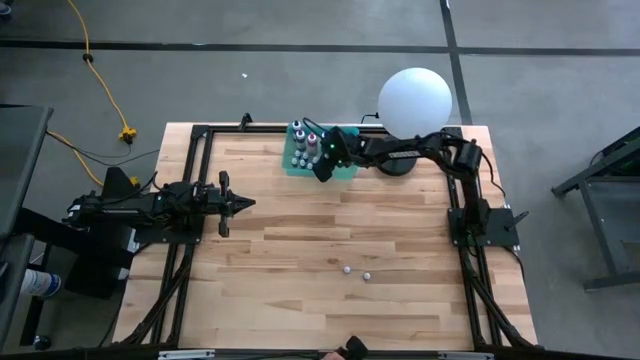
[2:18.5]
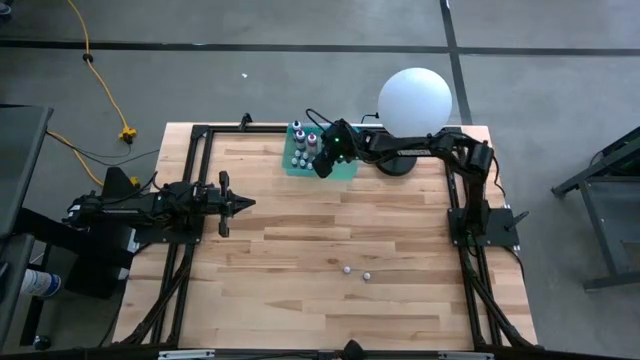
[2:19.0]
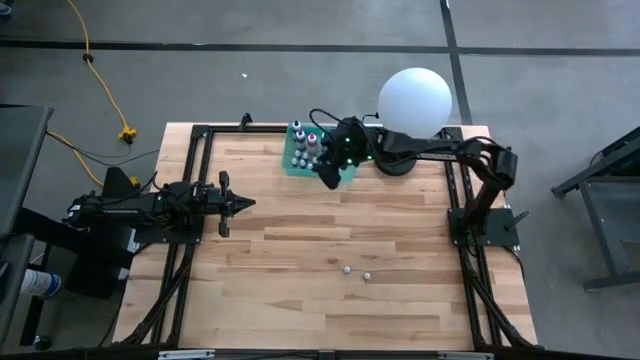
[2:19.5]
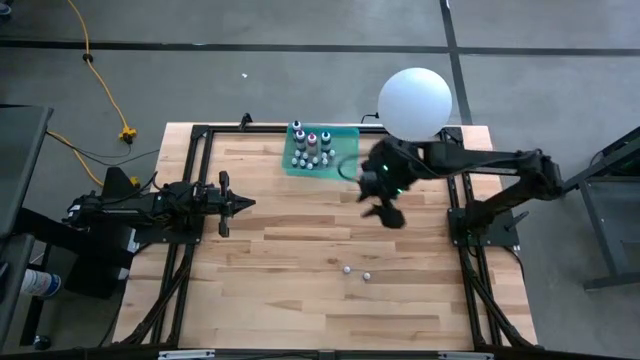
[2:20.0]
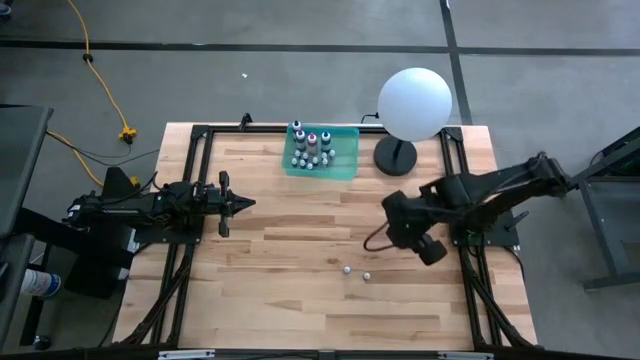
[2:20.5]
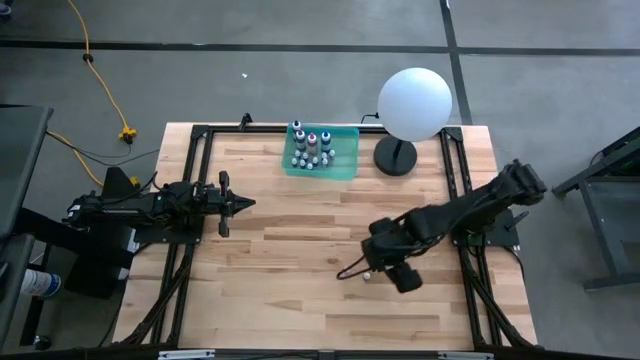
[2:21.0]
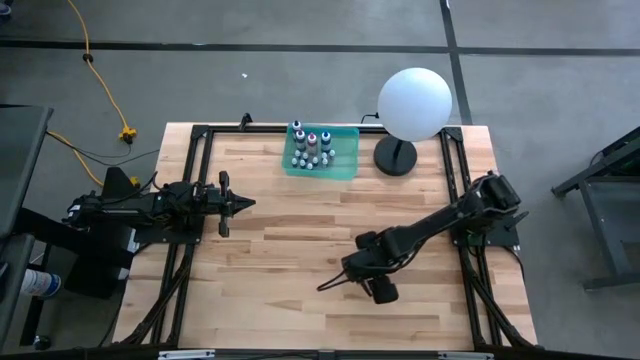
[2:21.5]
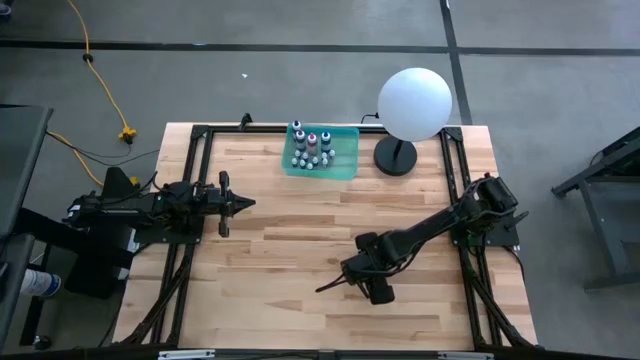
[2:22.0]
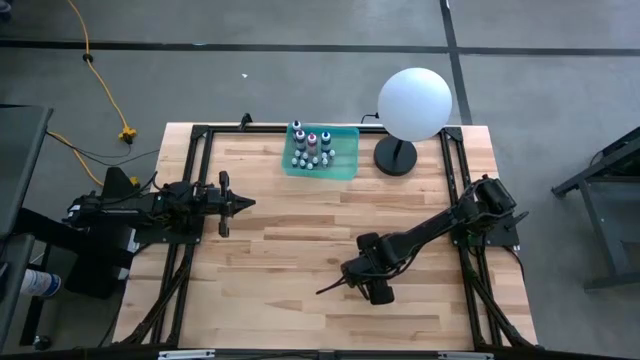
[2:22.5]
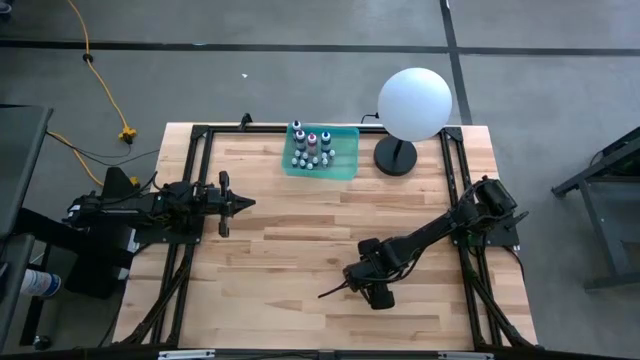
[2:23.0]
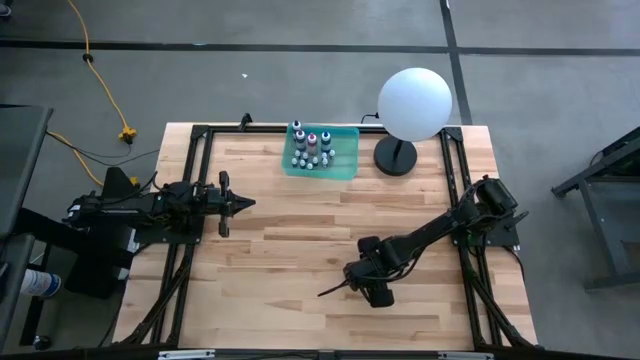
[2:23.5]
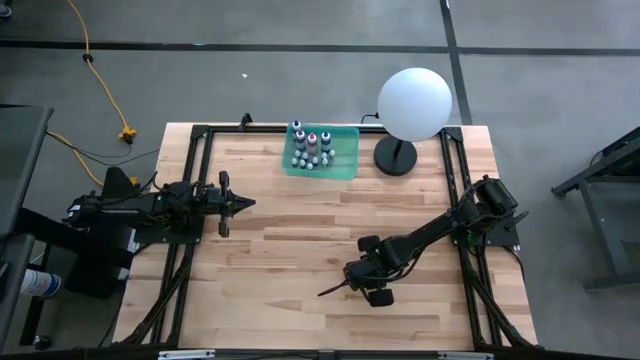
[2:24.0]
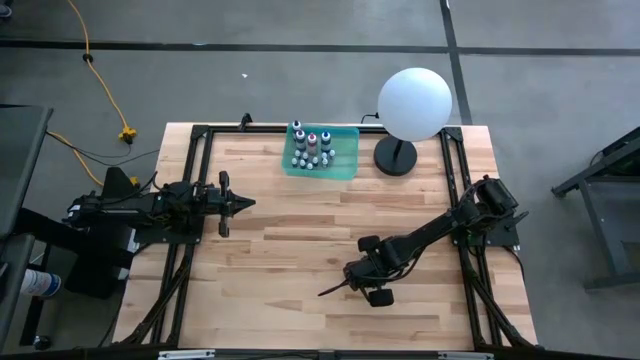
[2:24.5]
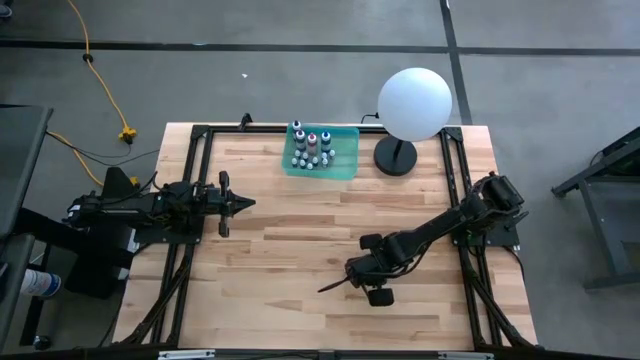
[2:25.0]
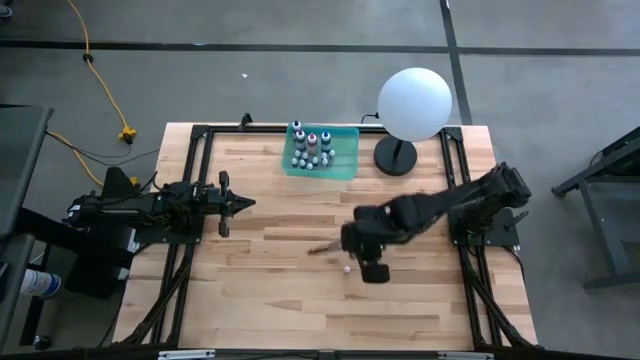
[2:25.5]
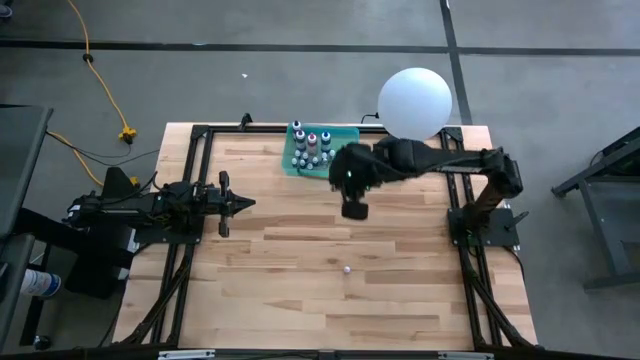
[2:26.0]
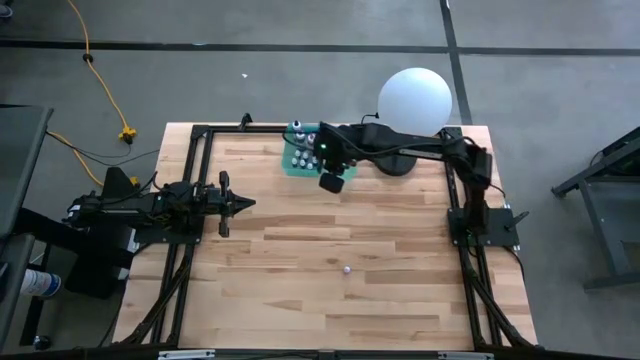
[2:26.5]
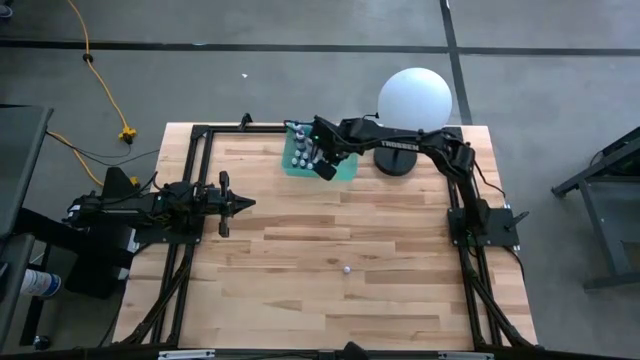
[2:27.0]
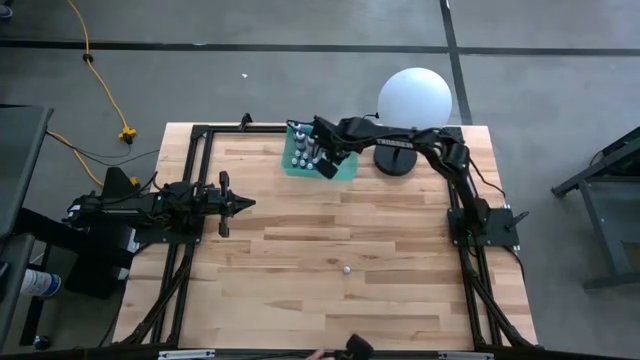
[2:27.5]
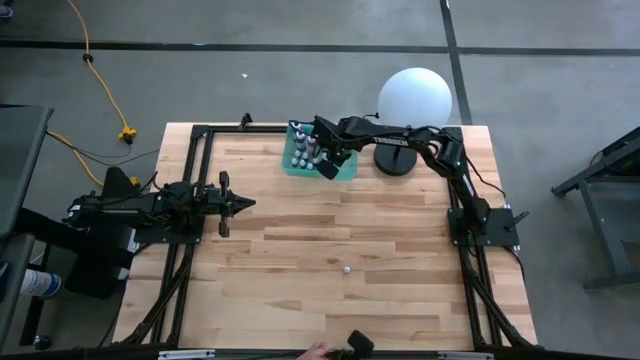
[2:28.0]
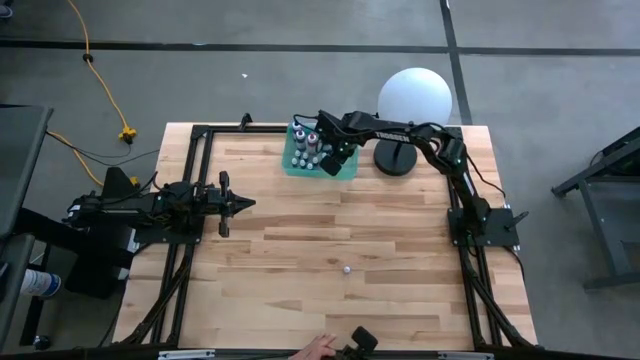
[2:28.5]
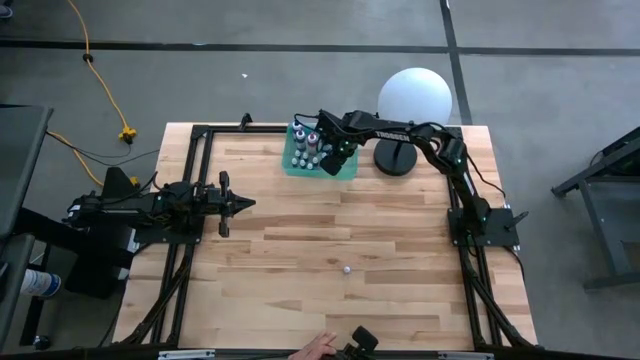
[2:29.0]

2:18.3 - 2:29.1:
Task: Pick & Place food coloring
Put the small black food coloring bottle into the bin

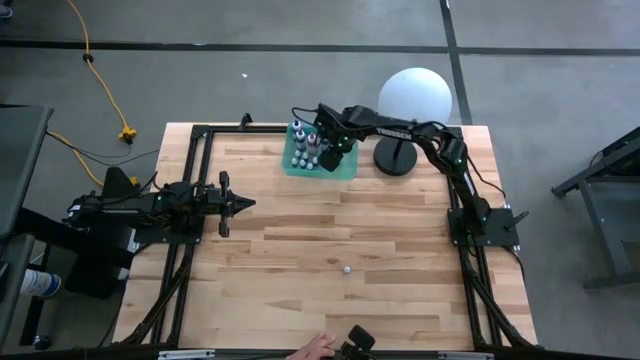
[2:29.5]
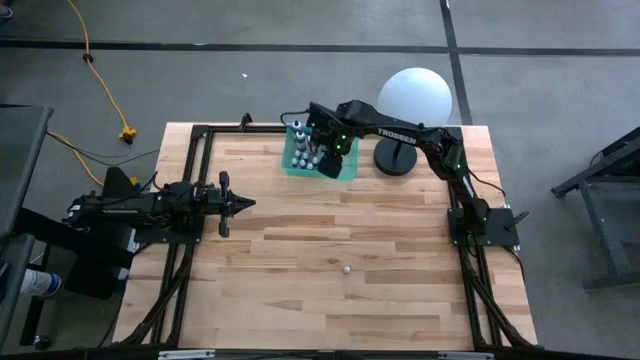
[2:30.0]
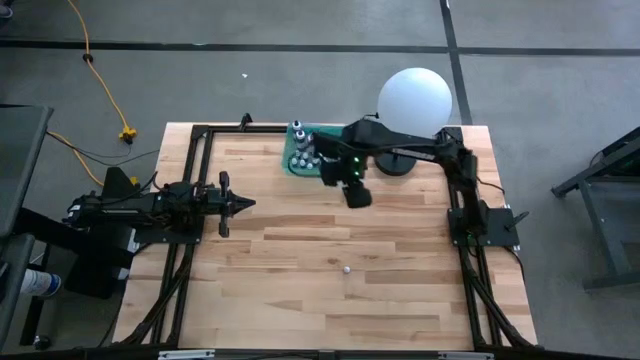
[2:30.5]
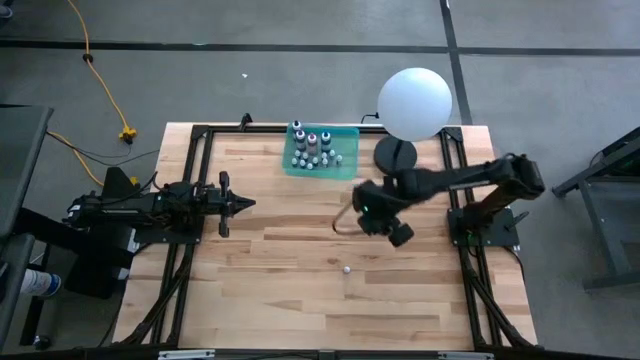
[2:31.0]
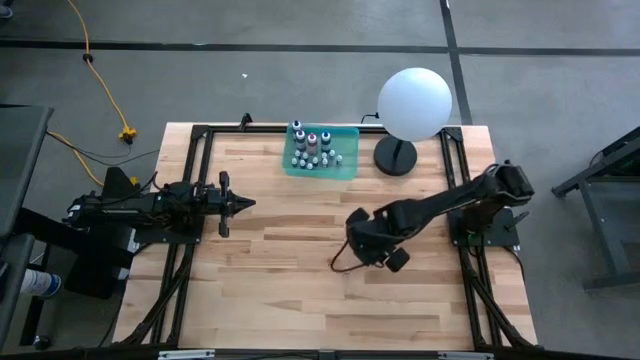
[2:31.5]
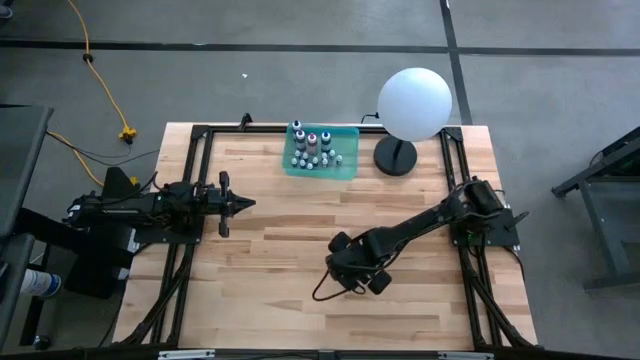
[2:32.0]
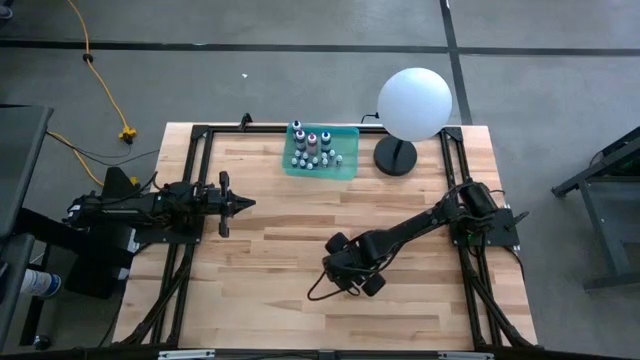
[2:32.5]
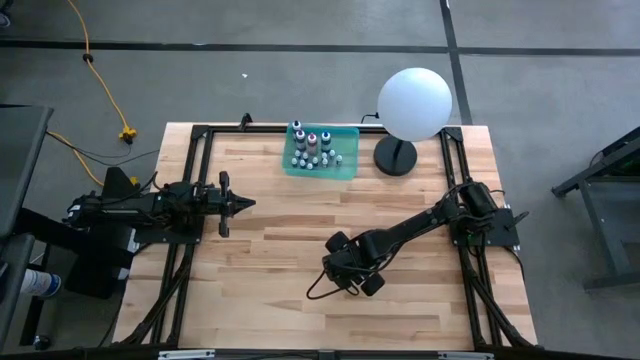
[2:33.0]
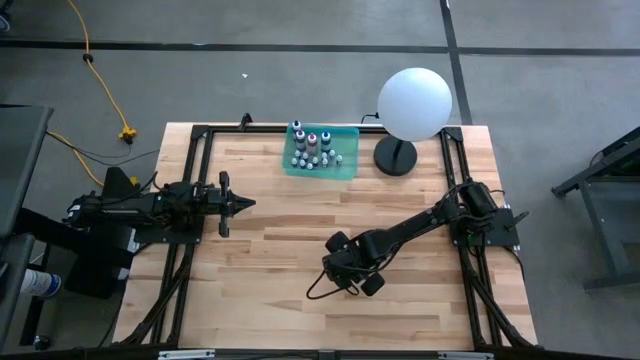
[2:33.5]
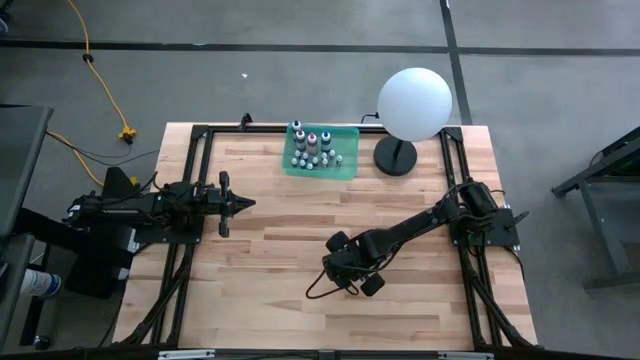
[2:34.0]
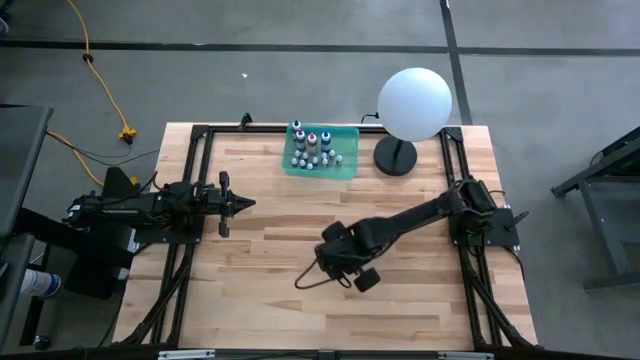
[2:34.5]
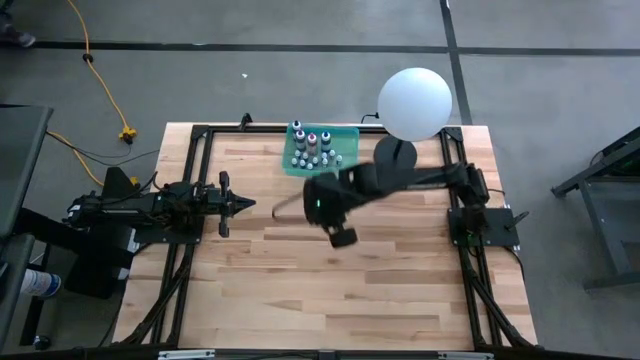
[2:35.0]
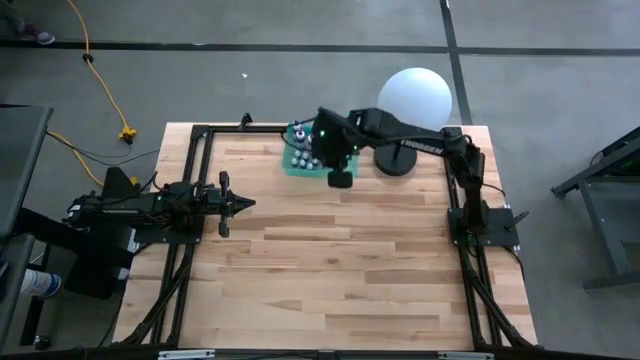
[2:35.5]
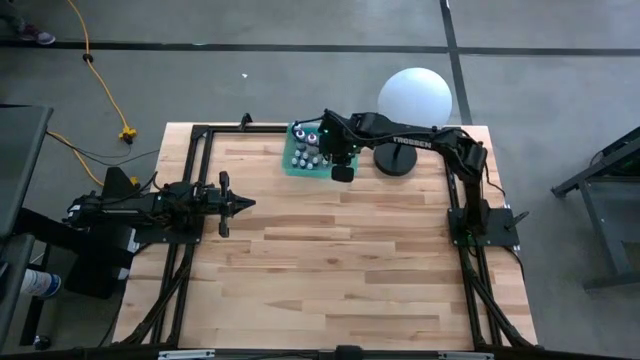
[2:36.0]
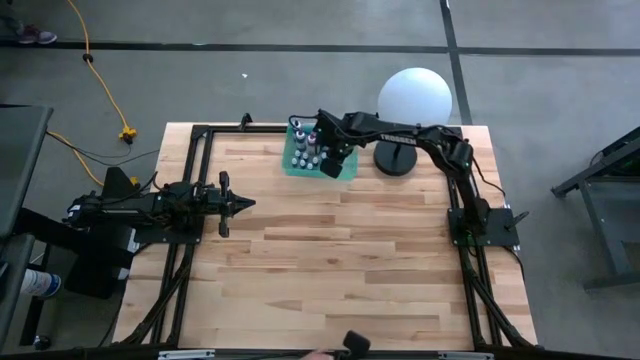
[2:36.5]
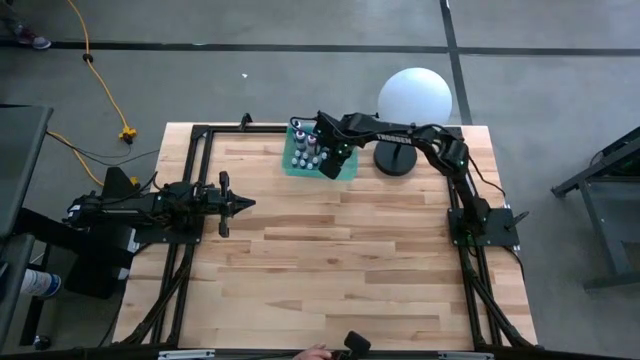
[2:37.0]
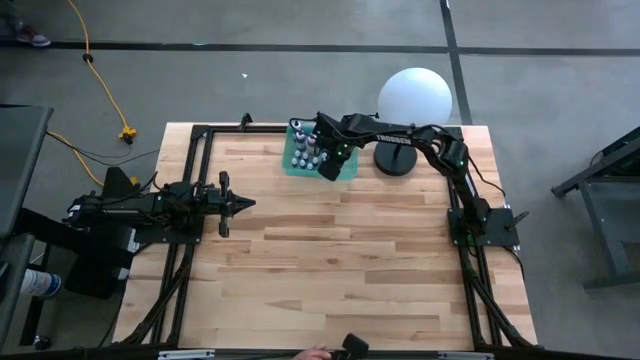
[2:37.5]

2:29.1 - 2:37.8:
Put the small red food coloring bottle into the bin

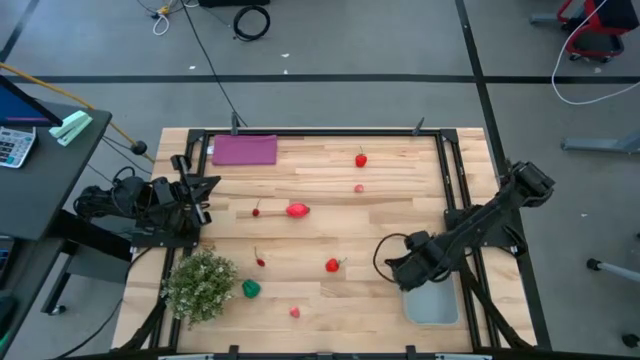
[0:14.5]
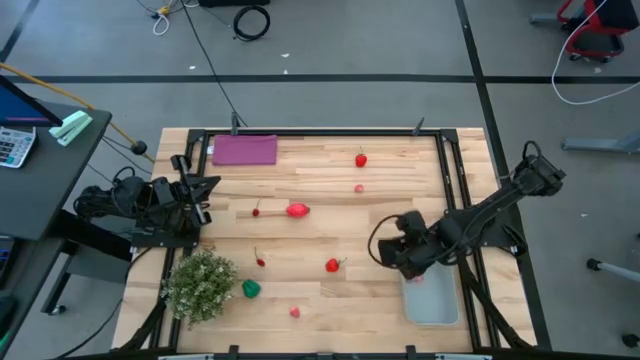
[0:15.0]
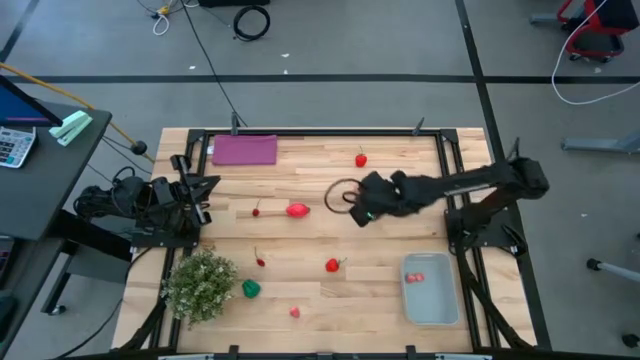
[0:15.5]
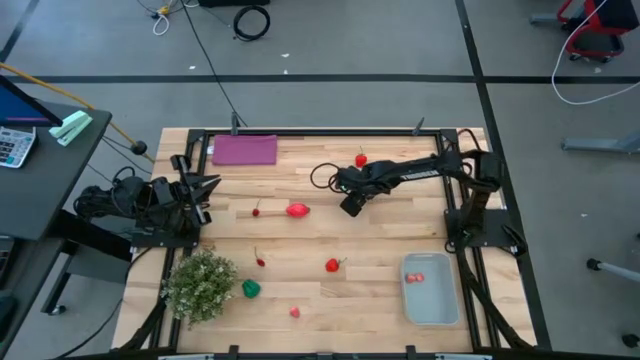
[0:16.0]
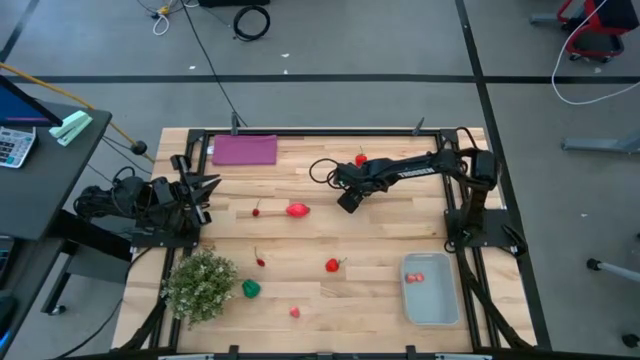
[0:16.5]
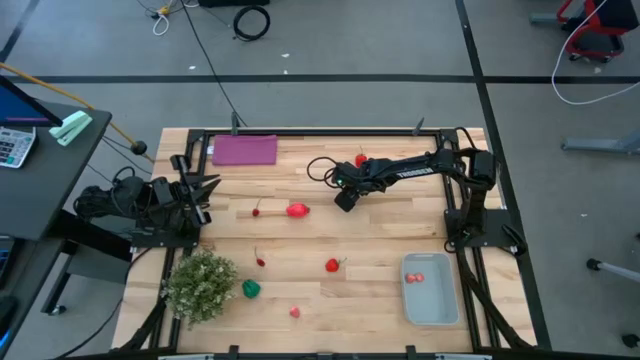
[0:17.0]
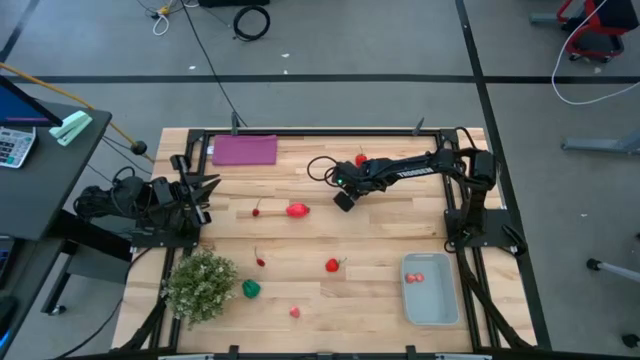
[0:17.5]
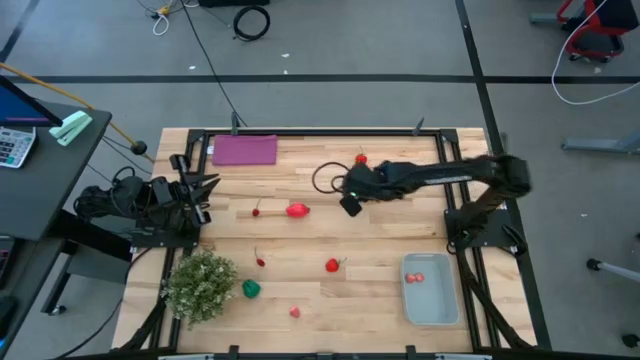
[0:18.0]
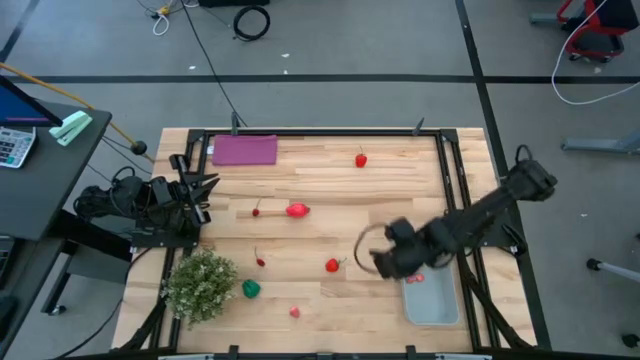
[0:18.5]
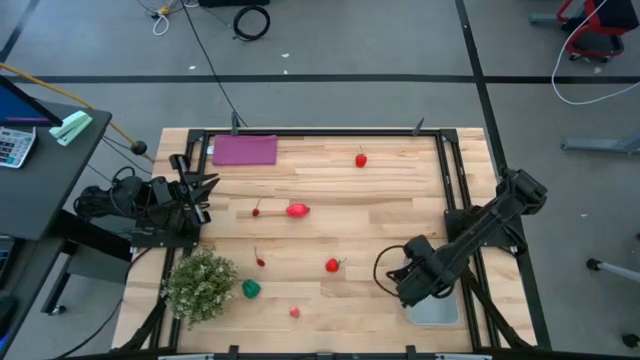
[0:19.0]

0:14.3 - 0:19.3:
Task: Pick and placing Produce into tupperware
Put the pink peach into the gray bin
